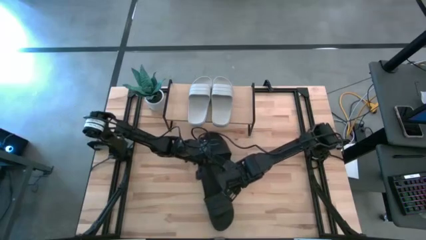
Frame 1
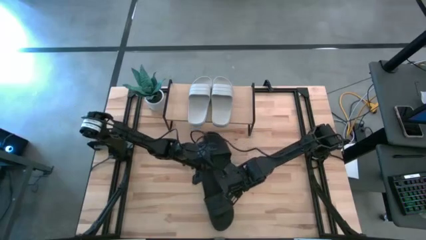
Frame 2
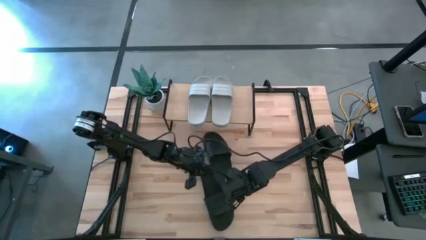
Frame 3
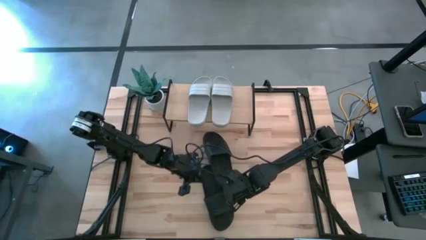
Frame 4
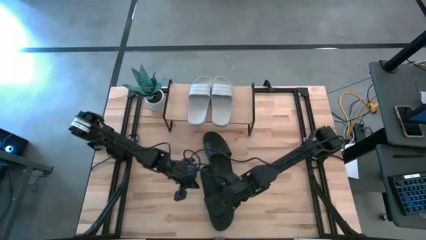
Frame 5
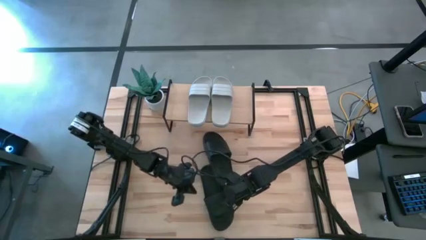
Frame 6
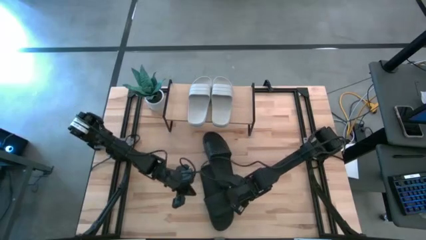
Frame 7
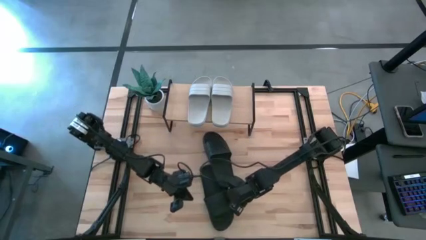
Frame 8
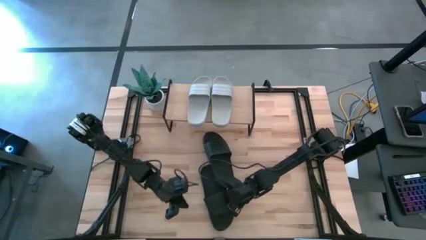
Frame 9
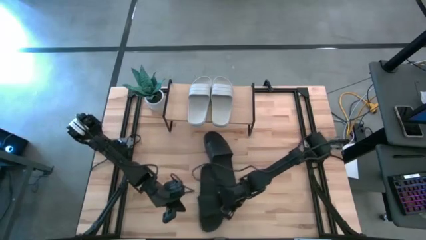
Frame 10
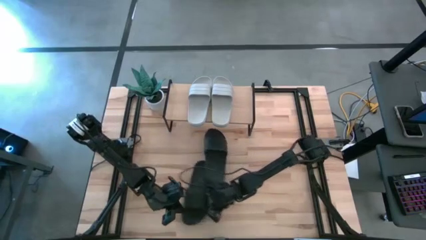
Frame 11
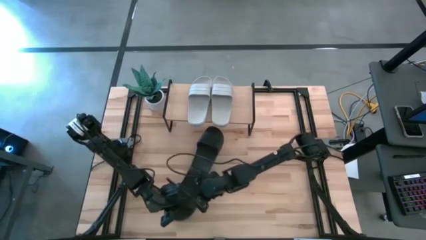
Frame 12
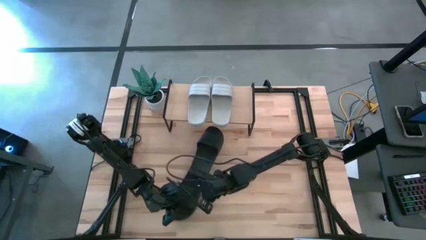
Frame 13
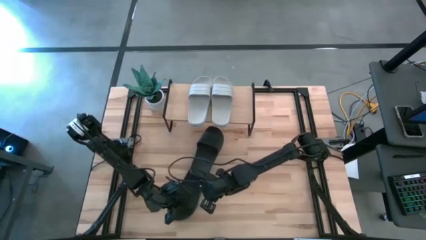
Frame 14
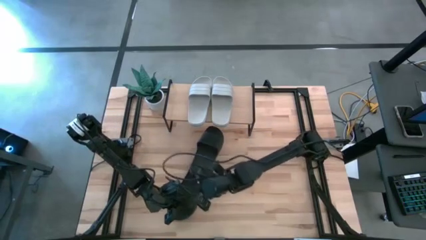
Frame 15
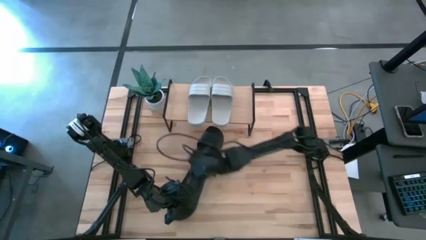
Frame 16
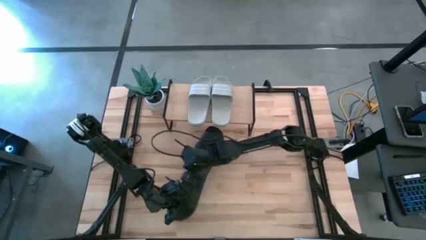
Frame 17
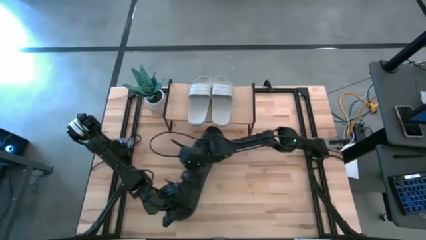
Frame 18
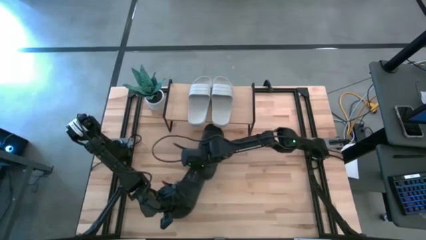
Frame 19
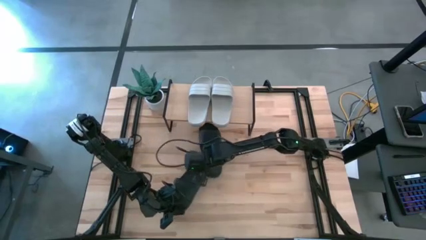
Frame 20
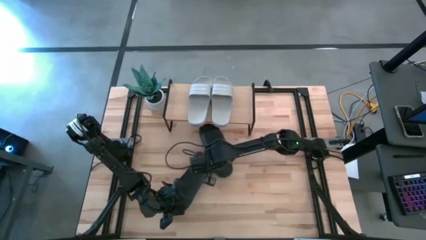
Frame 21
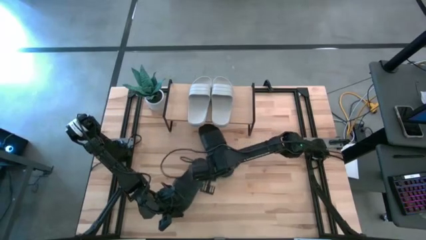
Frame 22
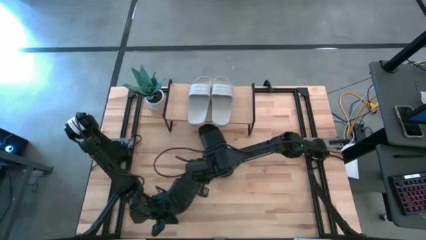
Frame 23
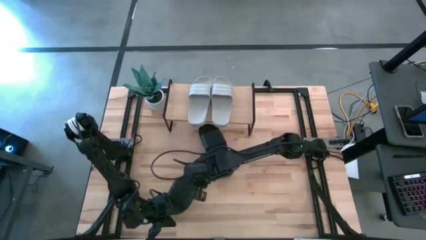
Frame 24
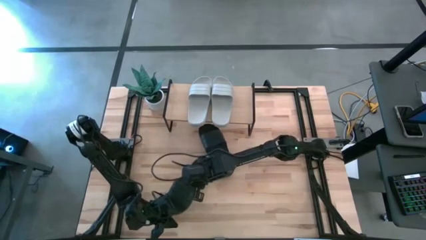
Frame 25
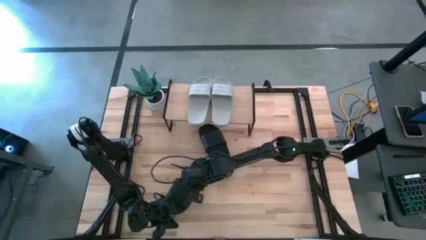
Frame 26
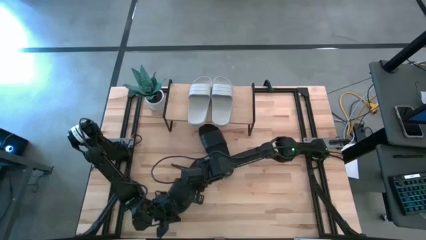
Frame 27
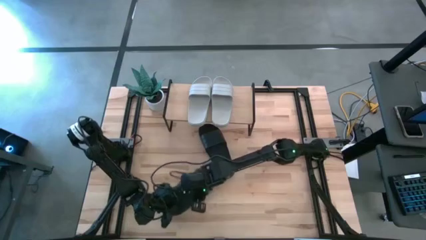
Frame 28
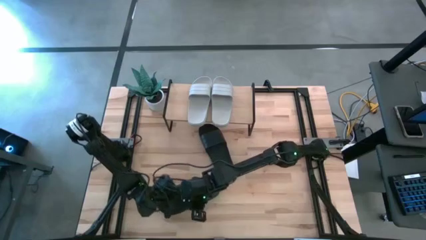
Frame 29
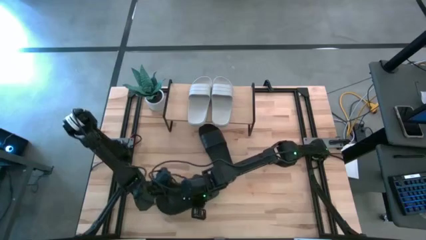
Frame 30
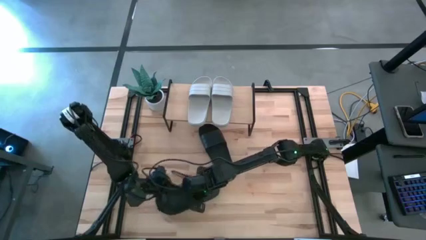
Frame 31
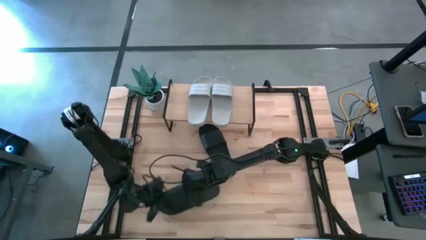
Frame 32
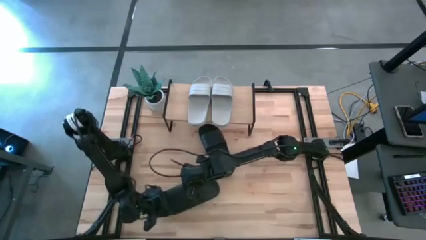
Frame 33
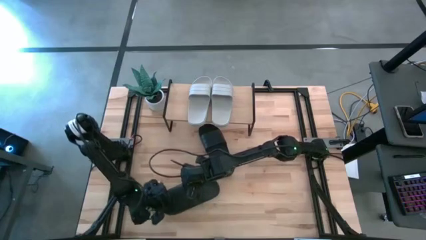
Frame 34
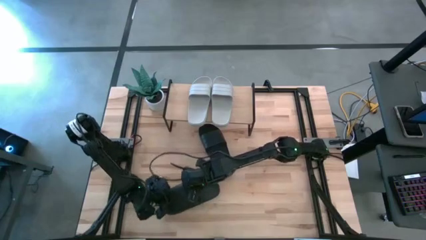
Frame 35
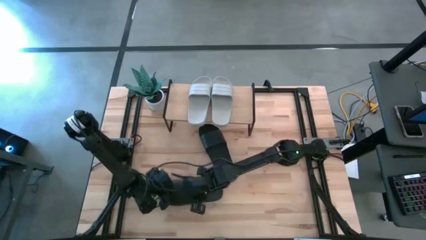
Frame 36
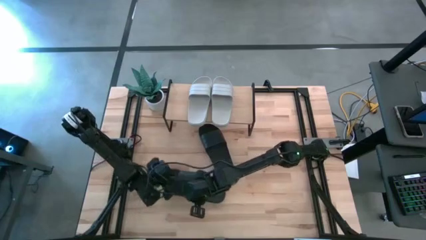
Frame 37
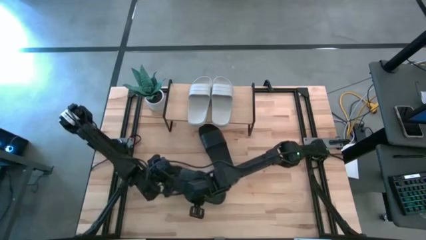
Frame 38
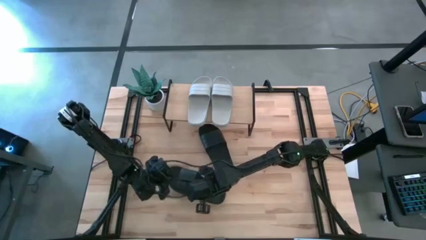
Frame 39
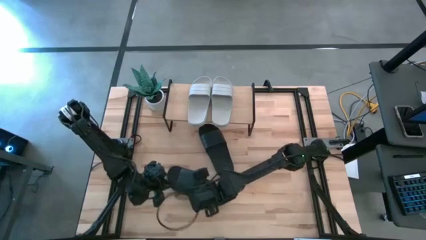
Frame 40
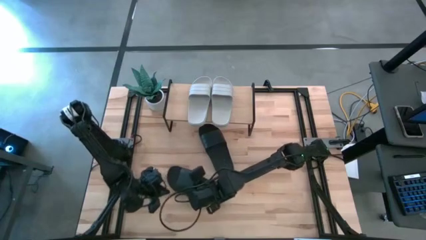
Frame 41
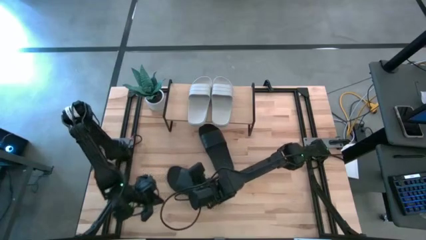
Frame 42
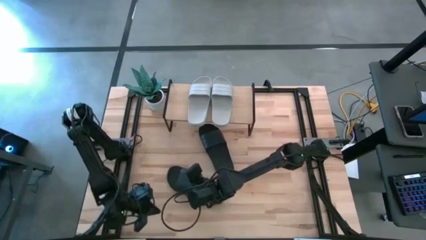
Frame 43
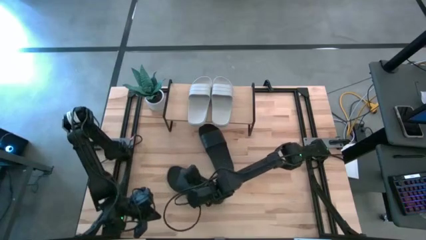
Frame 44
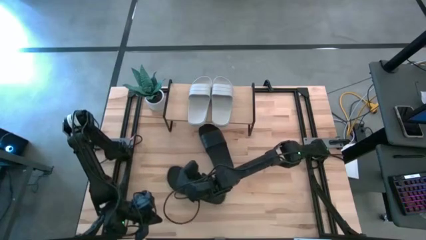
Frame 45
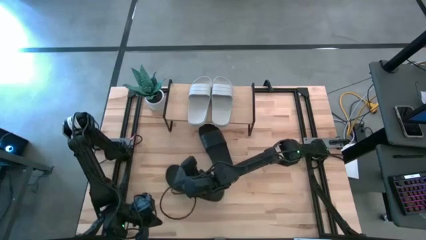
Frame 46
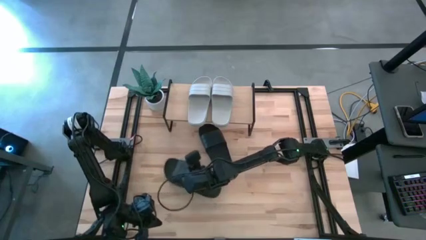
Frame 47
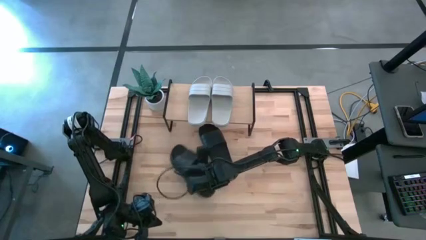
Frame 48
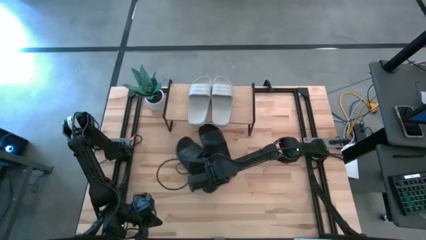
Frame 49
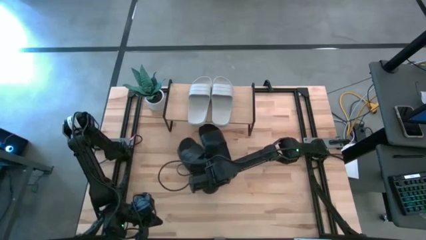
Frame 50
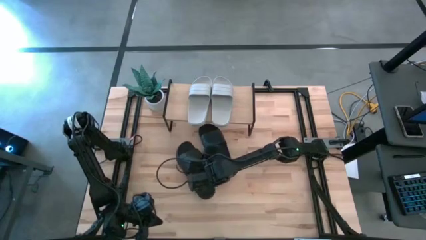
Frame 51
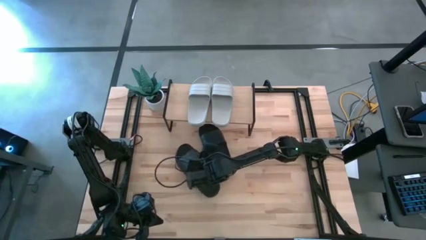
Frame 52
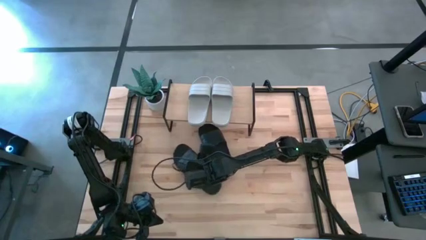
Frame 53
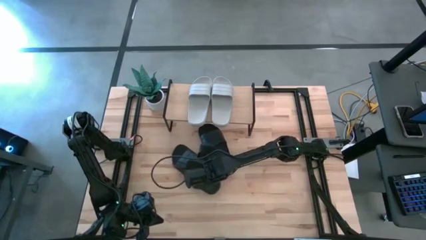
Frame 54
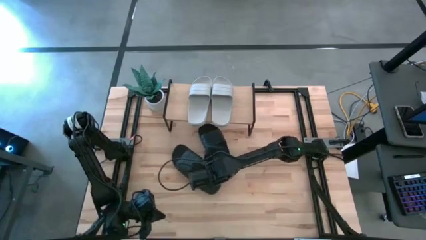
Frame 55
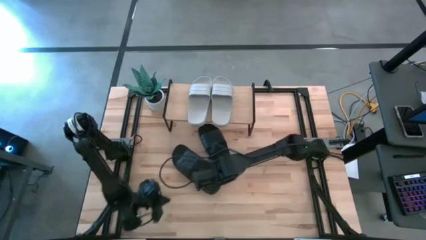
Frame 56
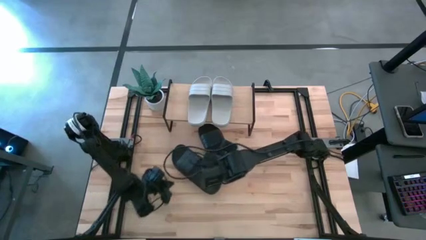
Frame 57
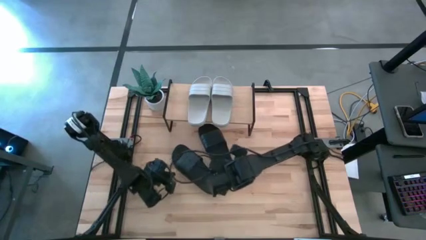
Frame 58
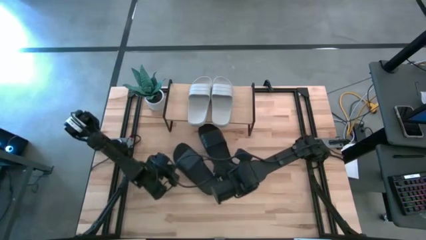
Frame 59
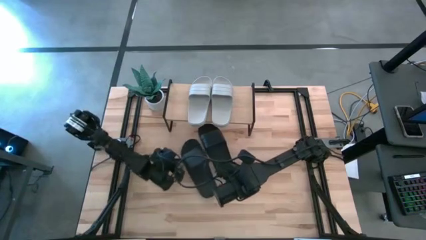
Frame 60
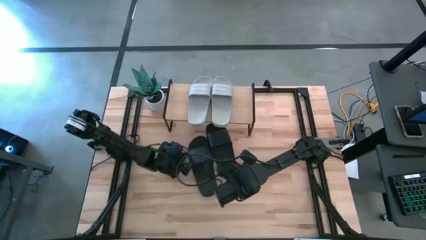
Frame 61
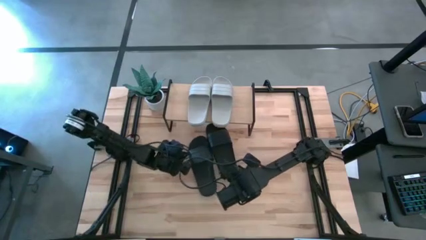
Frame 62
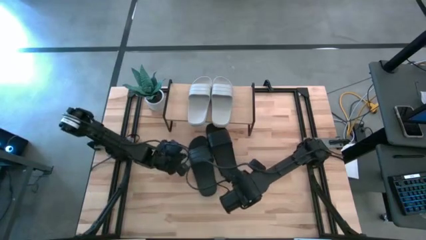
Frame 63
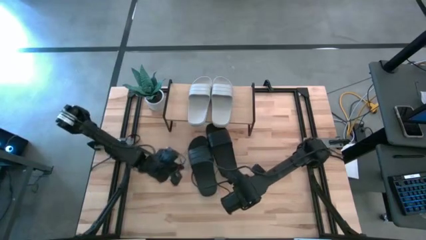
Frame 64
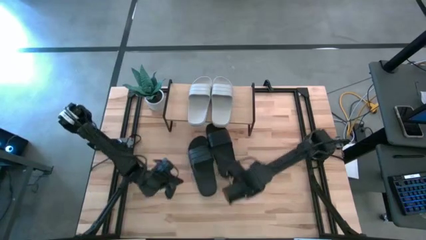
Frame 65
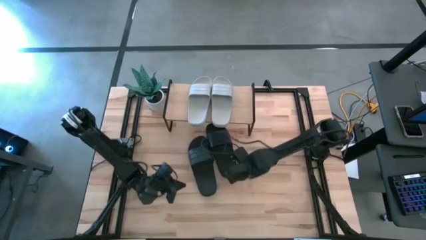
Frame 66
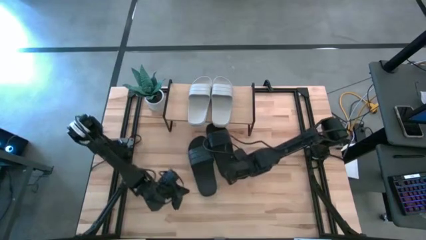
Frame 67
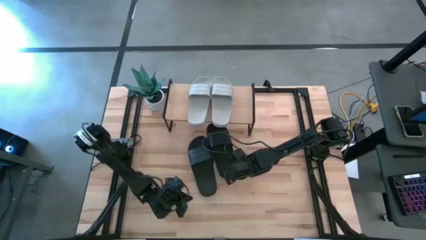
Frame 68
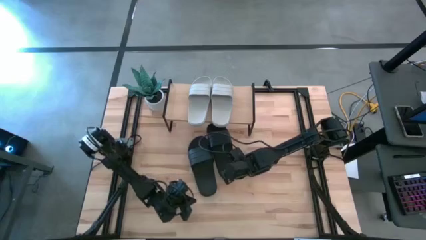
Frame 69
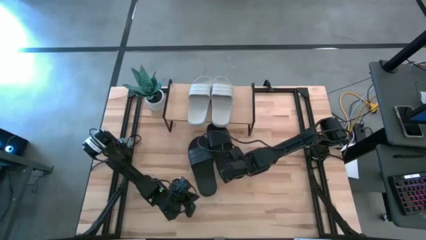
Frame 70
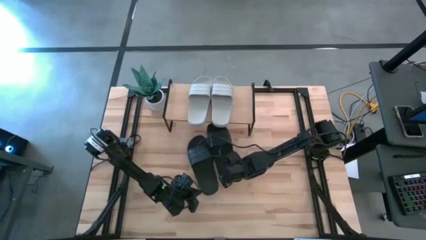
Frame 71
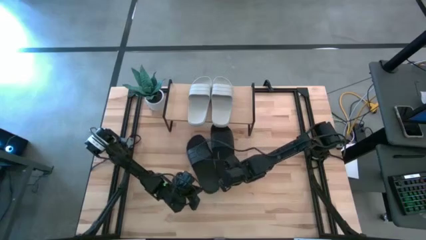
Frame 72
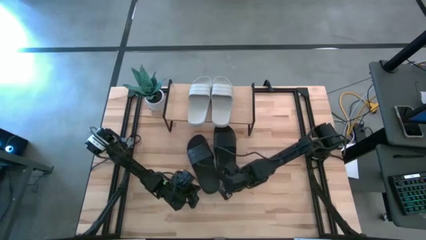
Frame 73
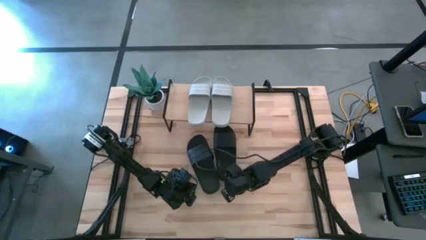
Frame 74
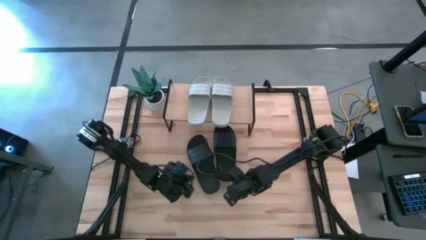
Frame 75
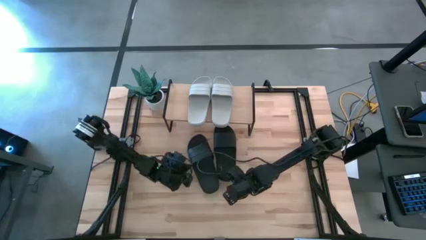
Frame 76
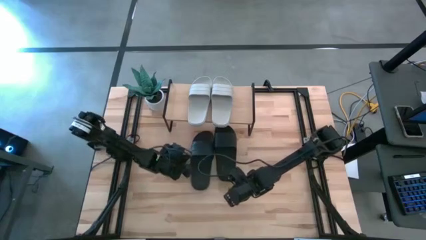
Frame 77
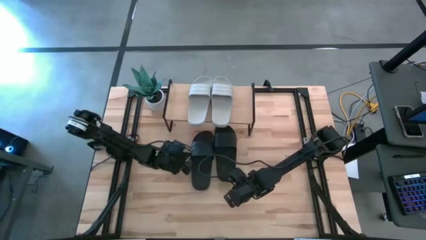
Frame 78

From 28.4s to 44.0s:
Task: Pick and place slides into the shelf
Put the left black slide under the shelf
